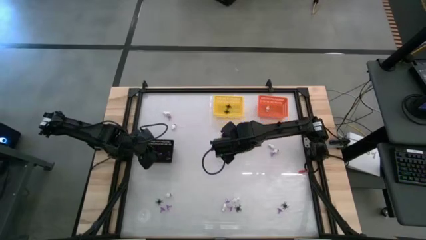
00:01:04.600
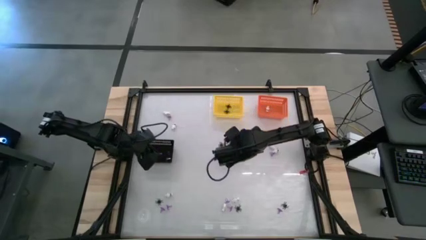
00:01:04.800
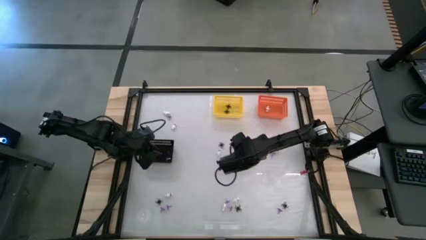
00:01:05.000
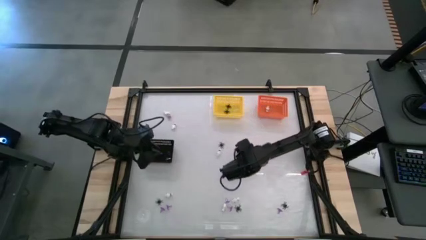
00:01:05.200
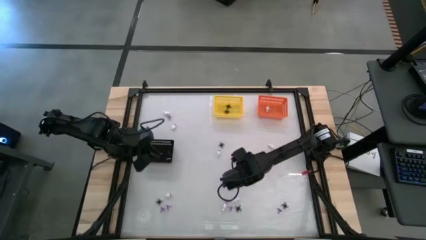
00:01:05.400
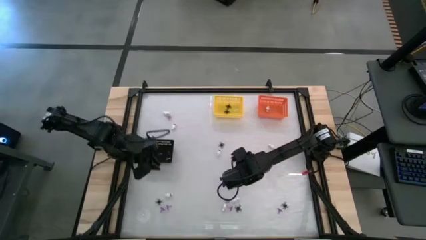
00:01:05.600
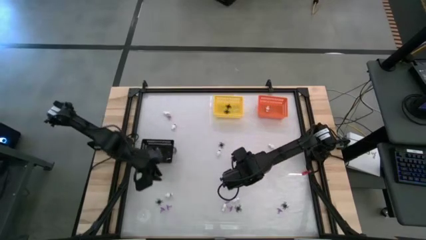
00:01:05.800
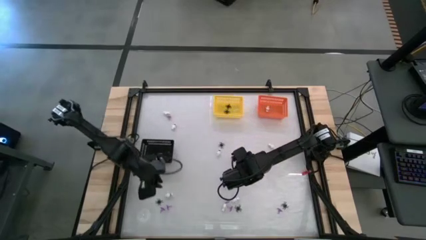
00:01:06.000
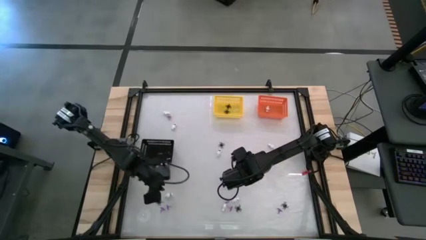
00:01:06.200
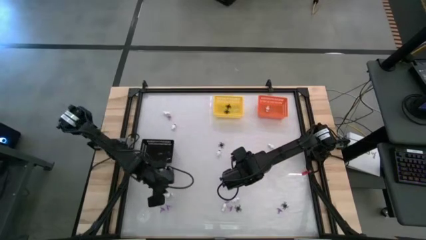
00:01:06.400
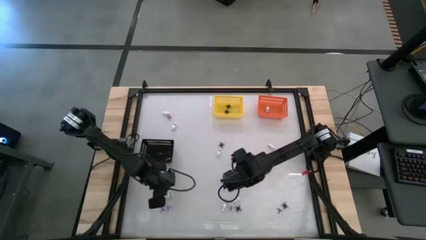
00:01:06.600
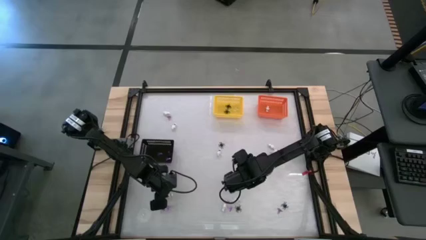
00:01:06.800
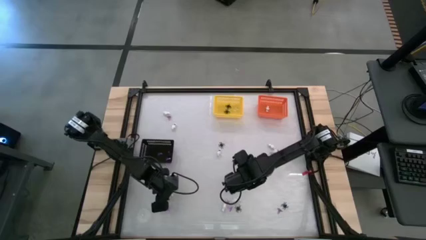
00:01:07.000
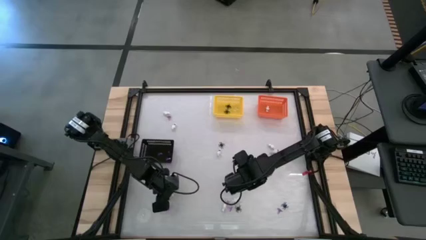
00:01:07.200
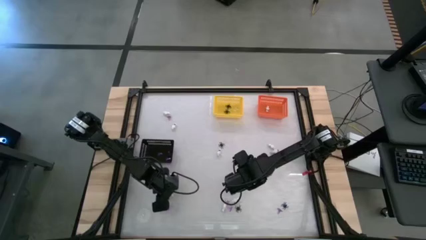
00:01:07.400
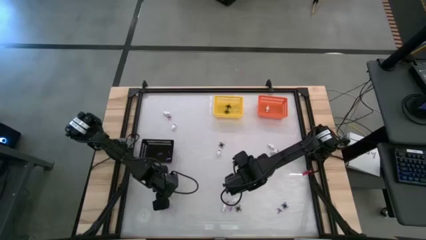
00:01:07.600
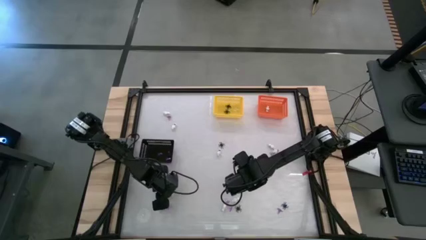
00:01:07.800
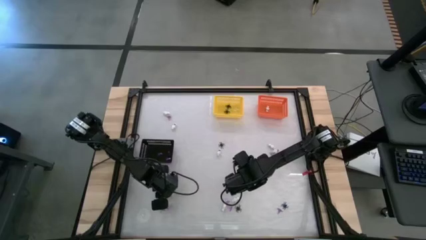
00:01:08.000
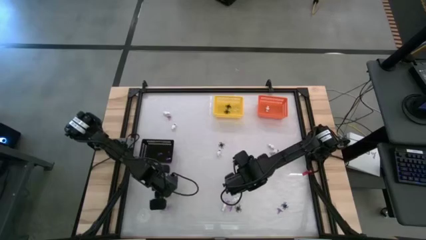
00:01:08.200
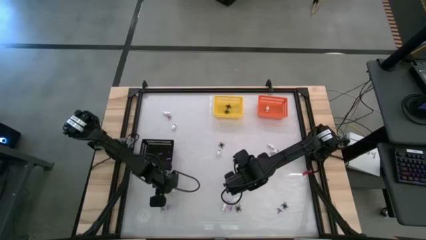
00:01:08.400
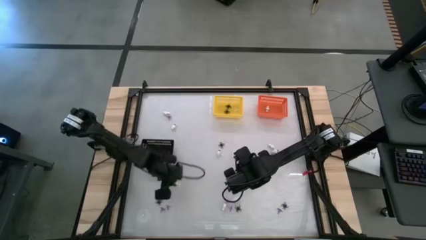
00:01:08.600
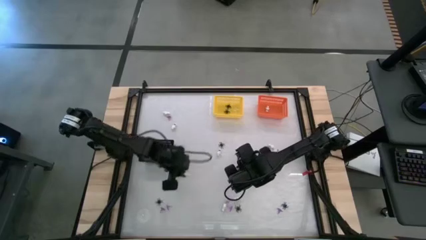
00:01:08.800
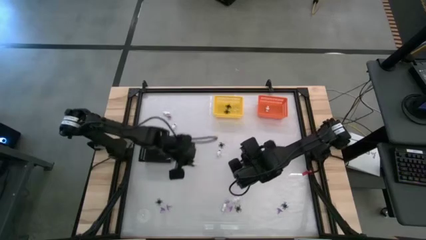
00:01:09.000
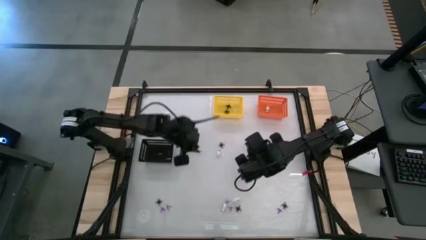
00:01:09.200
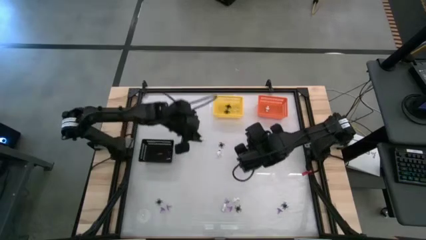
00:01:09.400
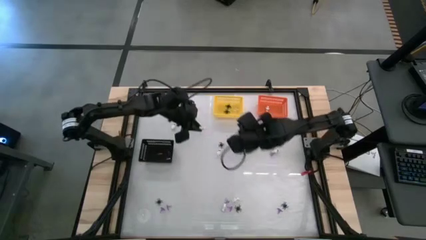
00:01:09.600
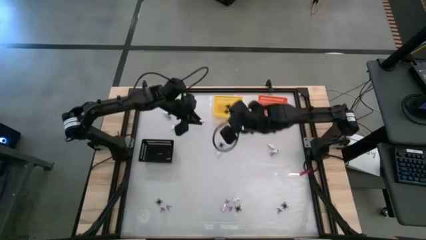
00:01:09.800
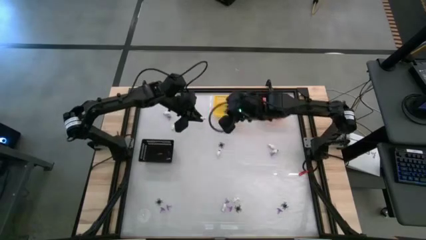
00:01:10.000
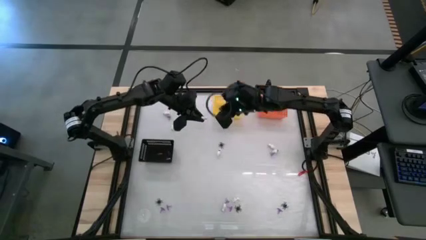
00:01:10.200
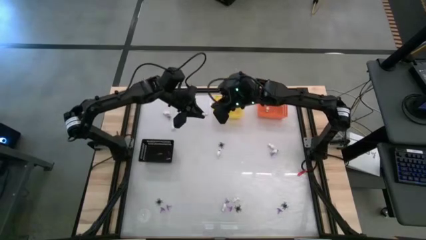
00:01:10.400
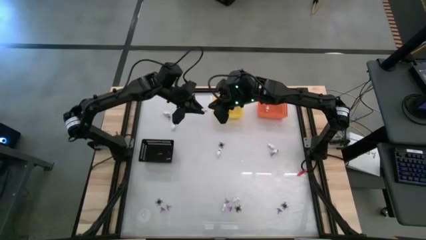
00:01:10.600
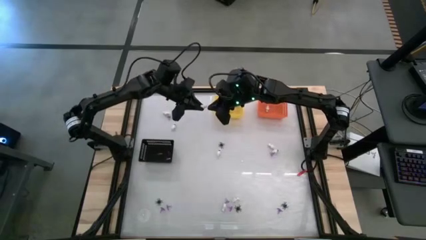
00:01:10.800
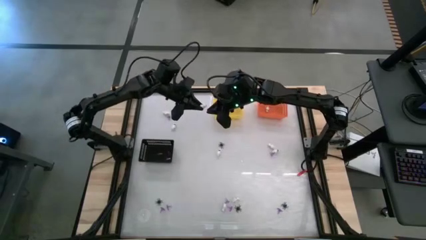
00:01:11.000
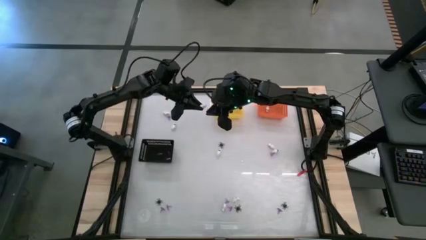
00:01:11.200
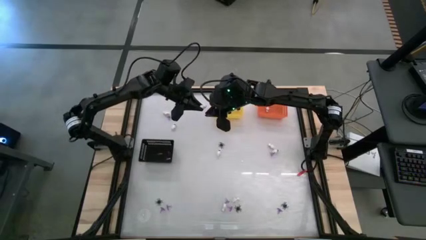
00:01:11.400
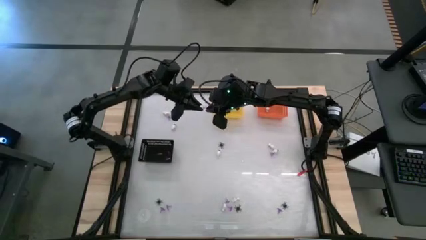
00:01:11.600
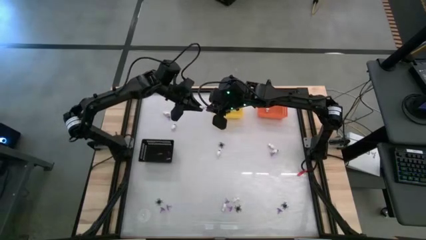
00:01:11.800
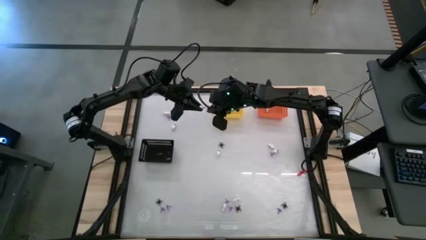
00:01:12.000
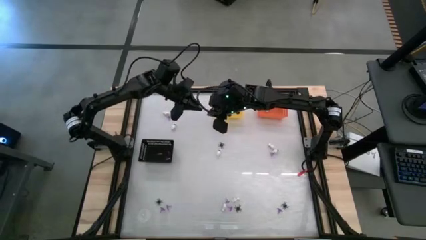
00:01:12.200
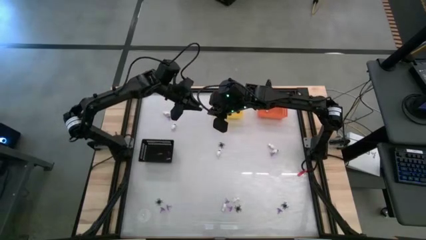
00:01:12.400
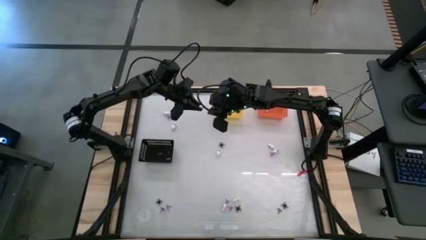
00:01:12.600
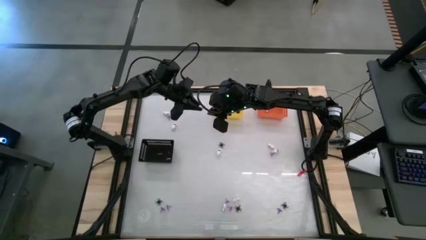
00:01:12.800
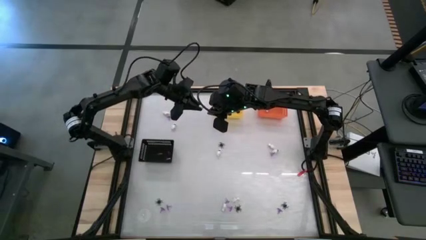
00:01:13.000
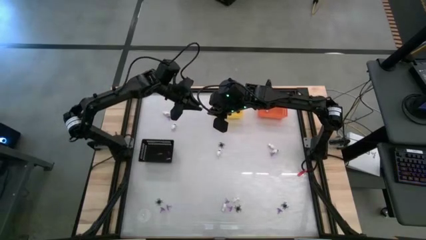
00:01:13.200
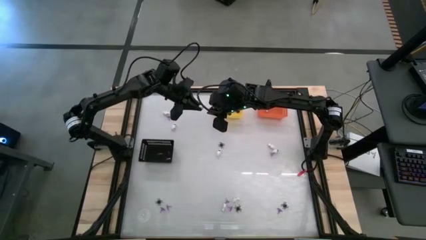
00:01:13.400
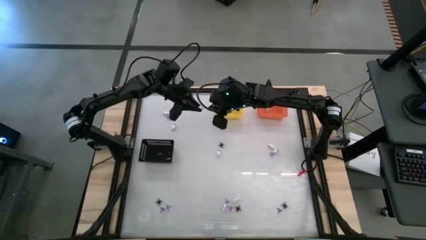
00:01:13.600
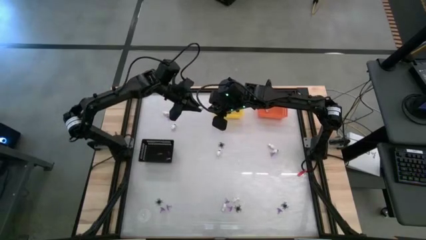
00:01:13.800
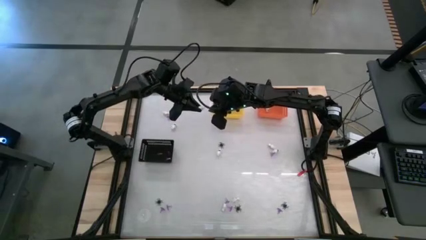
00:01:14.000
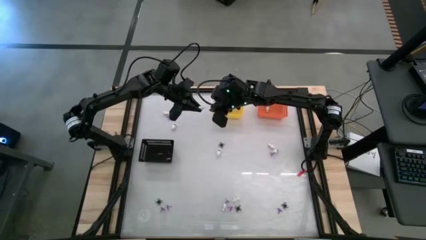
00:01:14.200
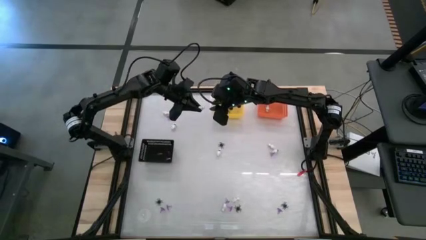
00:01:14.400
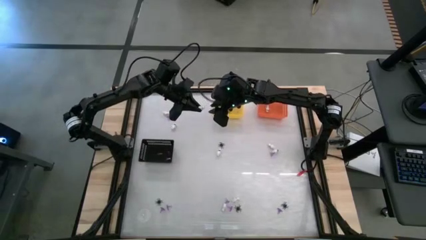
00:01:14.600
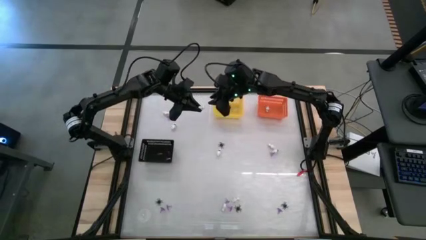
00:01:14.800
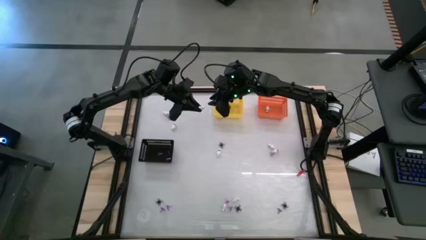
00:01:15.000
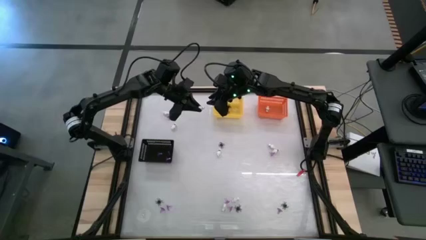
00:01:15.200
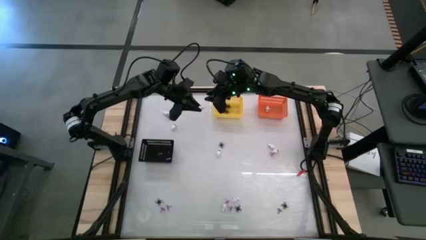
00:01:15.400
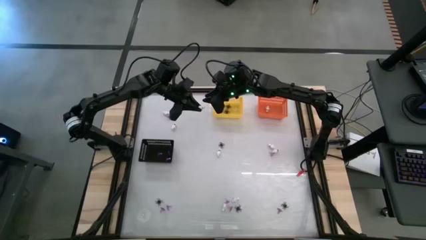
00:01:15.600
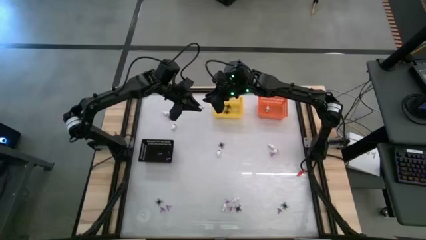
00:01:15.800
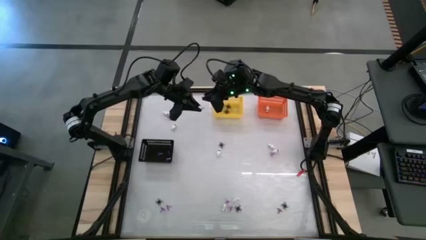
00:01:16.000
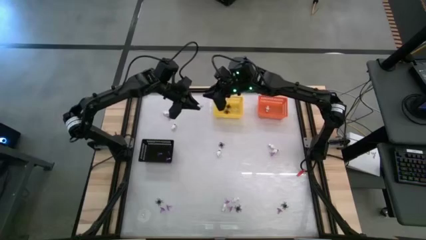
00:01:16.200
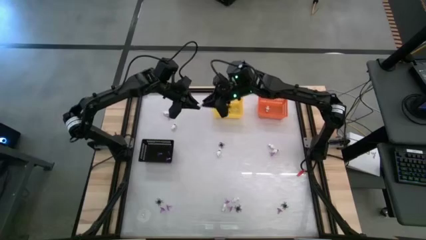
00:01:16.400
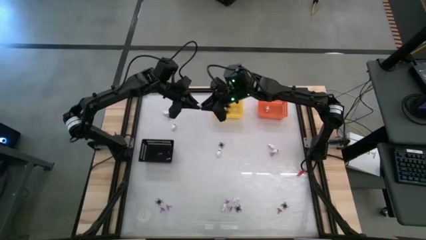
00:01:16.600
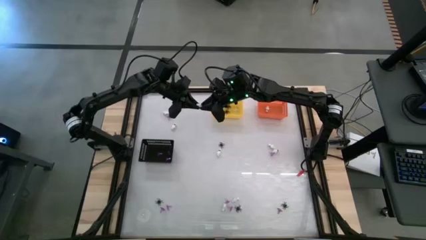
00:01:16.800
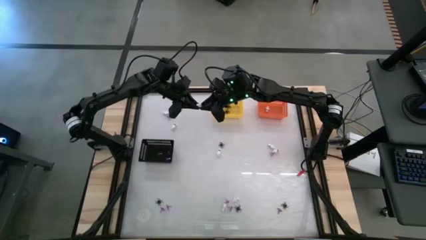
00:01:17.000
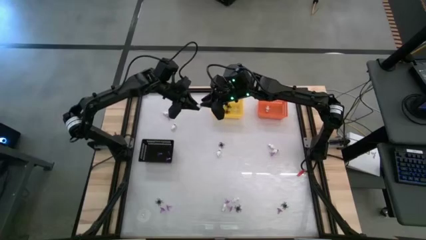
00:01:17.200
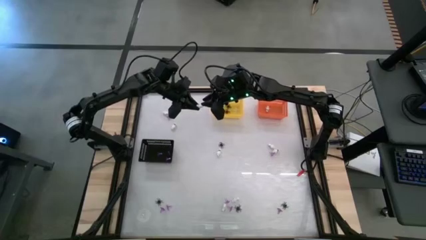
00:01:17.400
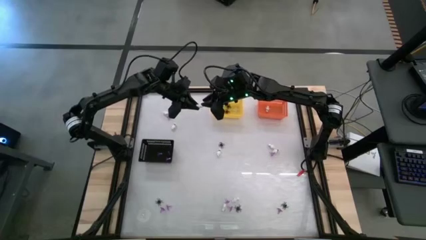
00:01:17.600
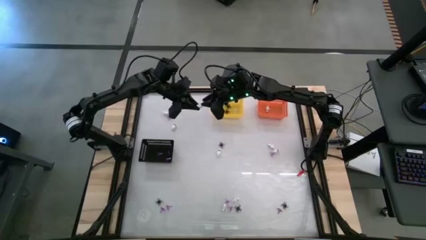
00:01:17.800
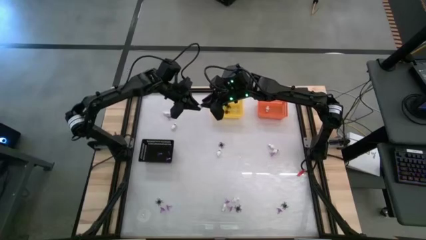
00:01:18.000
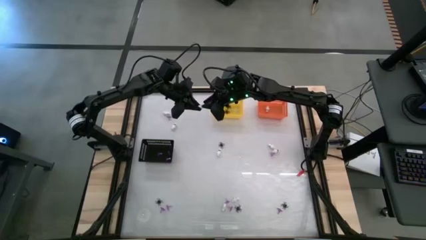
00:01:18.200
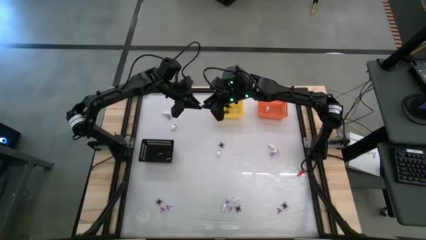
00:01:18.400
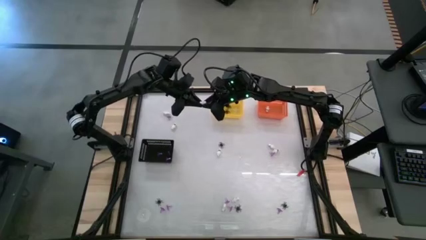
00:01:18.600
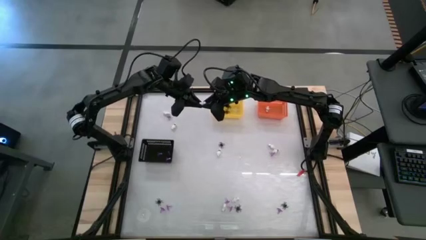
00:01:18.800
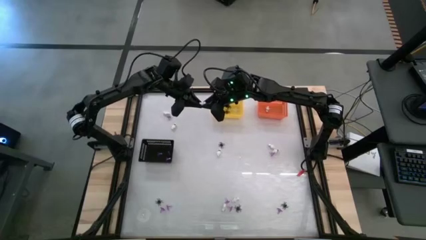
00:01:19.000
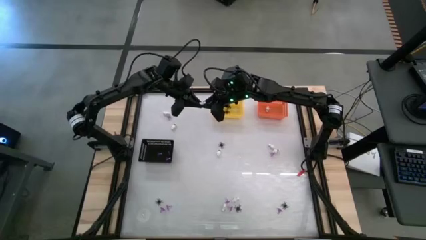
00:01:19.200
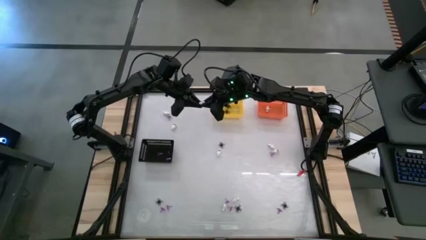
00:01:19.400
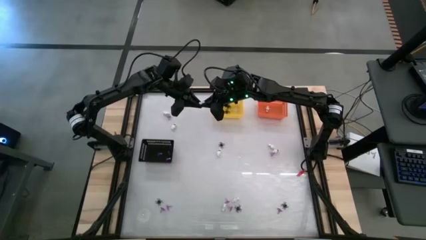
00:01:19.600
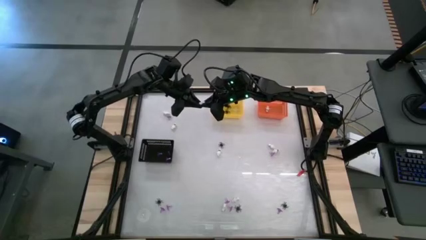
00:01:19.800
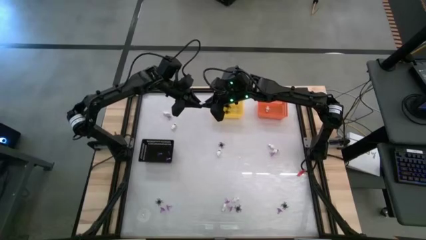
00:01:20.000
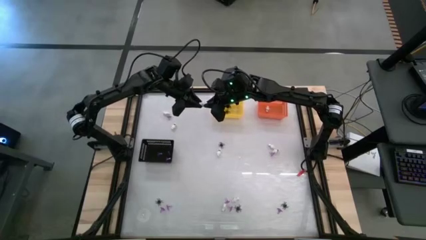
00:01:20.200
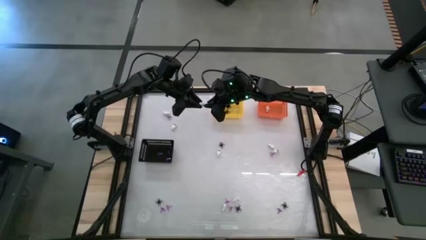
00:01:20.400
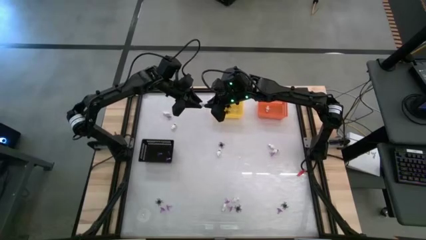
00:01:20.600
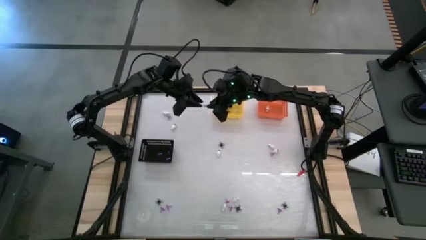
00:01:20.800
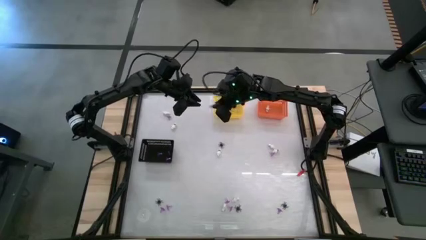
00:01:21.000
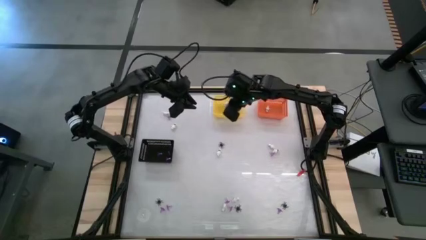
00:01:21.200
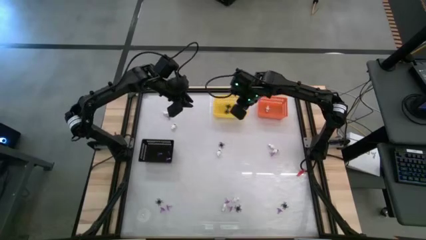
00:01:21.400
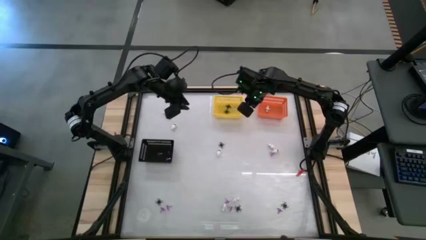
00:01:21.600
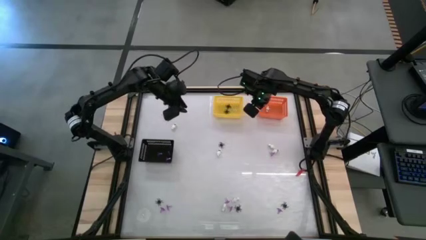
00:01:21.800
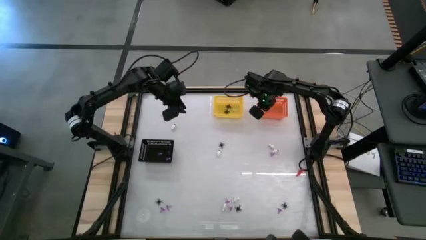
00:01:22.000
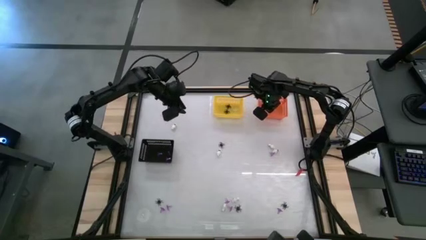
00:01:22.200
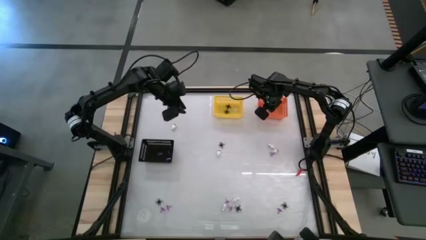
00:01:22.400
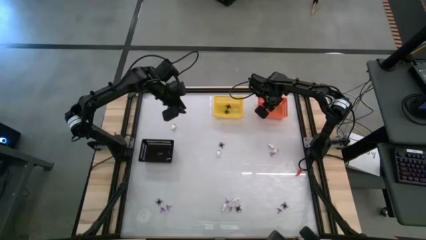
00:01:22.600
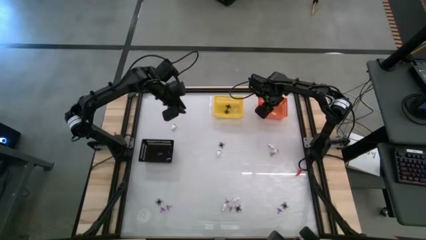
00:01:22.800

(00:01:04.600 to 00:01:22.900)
Task: Sort Halloween decoration
Put the white skeleton toy into the orange bin
